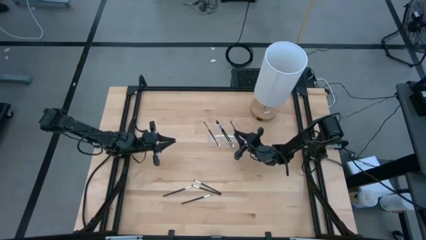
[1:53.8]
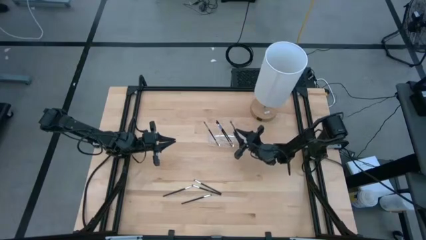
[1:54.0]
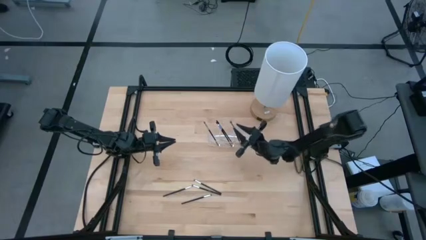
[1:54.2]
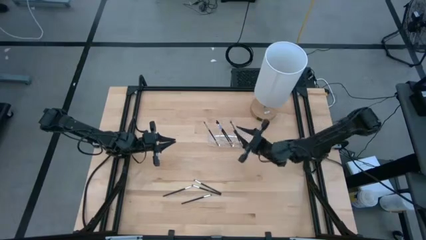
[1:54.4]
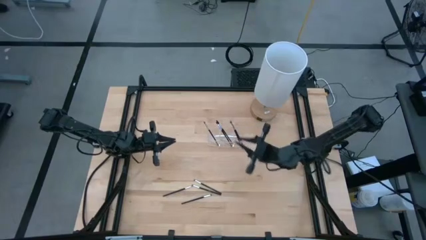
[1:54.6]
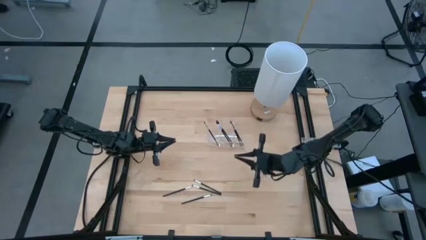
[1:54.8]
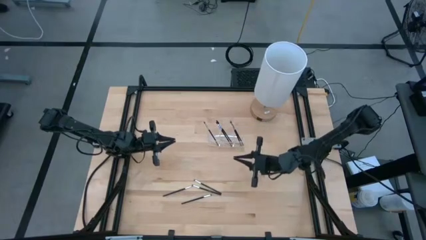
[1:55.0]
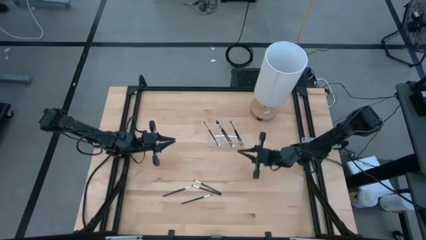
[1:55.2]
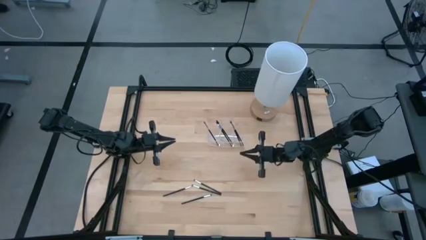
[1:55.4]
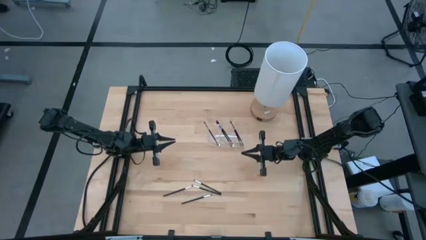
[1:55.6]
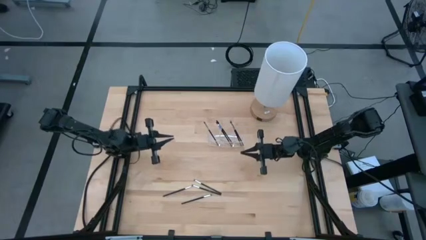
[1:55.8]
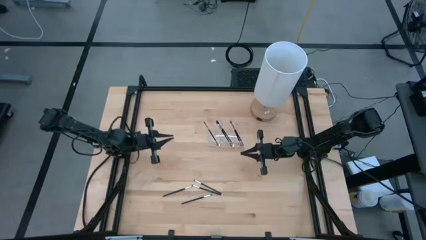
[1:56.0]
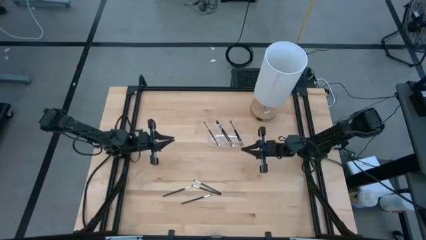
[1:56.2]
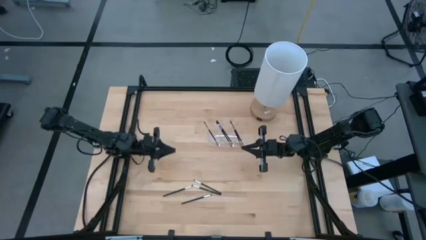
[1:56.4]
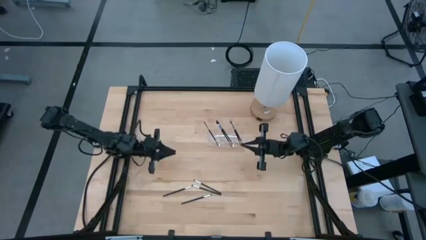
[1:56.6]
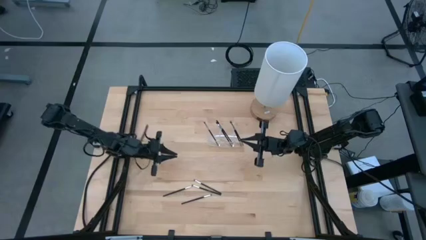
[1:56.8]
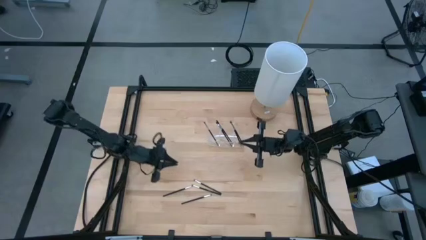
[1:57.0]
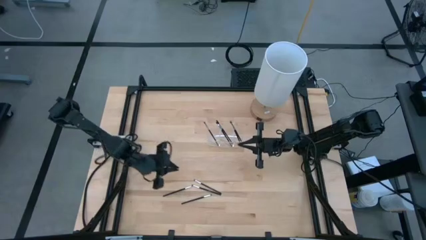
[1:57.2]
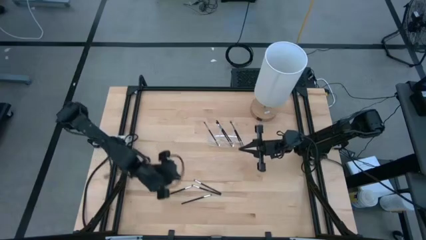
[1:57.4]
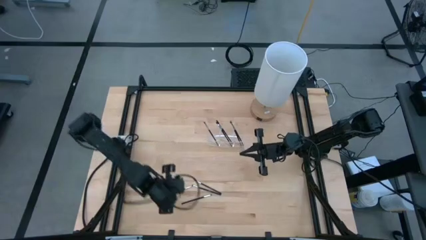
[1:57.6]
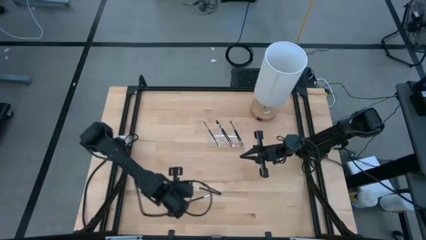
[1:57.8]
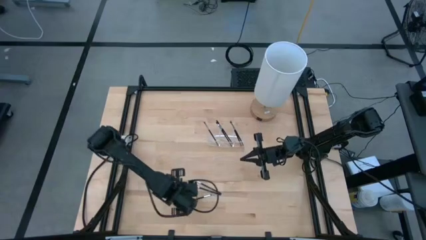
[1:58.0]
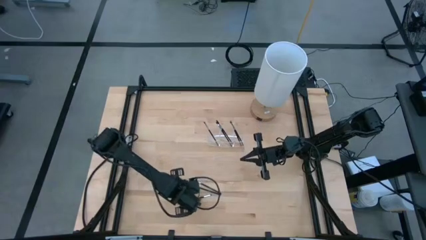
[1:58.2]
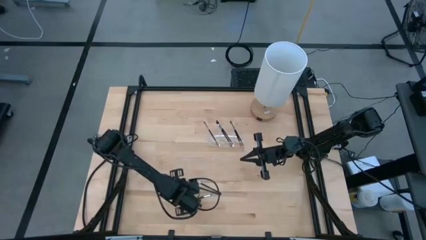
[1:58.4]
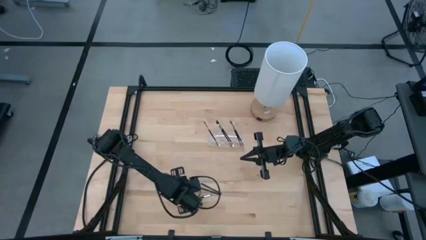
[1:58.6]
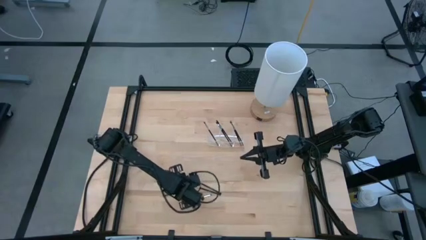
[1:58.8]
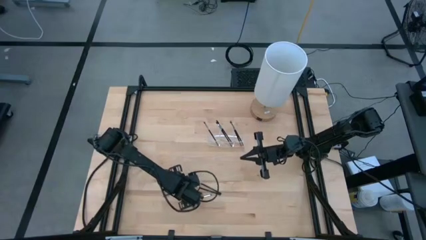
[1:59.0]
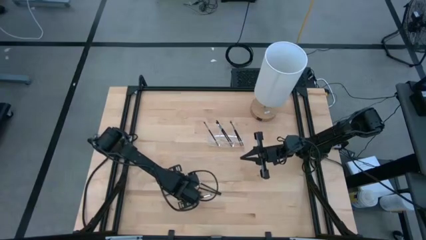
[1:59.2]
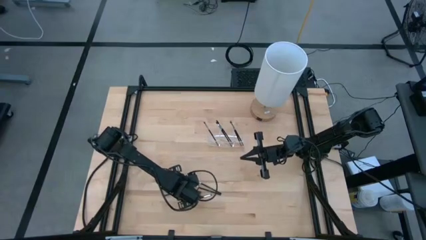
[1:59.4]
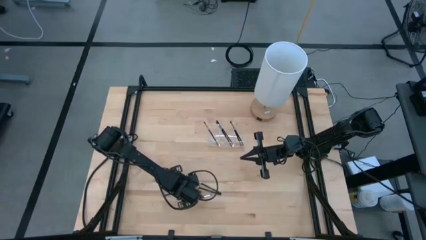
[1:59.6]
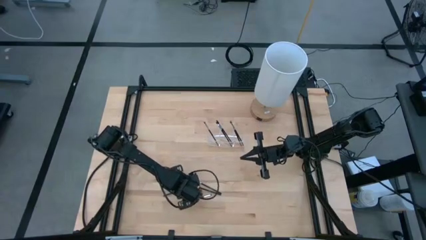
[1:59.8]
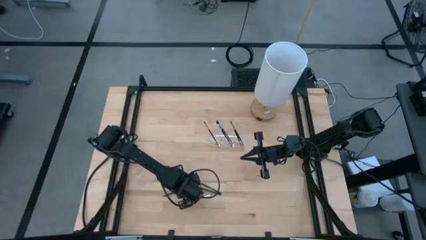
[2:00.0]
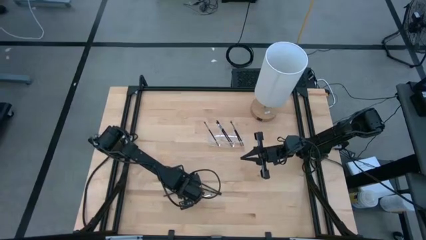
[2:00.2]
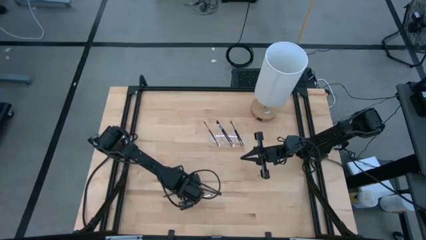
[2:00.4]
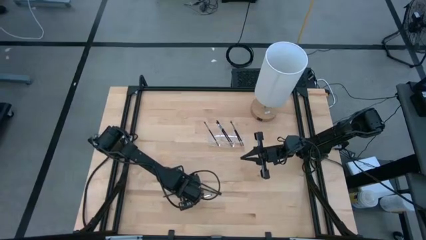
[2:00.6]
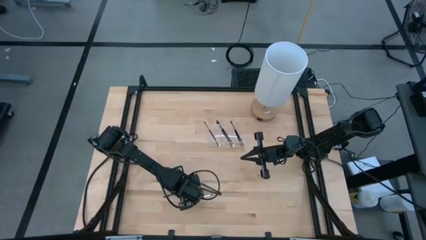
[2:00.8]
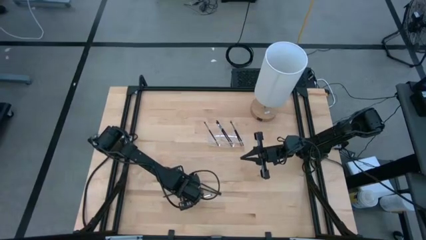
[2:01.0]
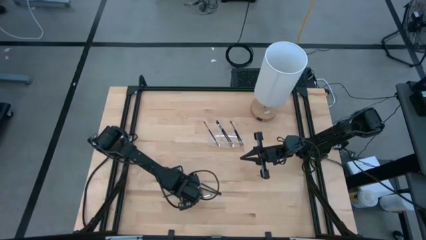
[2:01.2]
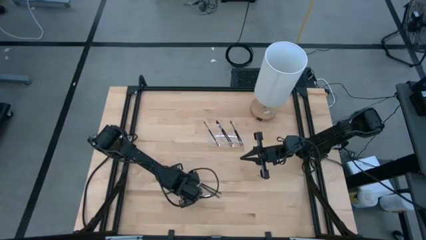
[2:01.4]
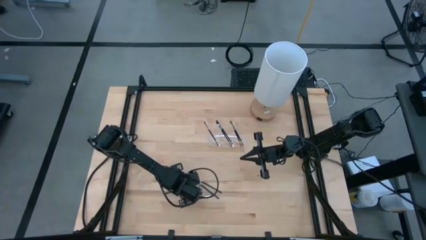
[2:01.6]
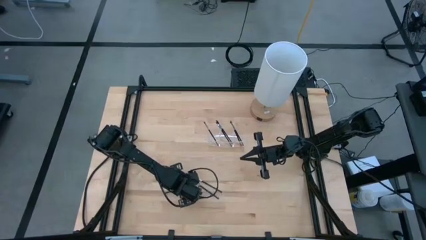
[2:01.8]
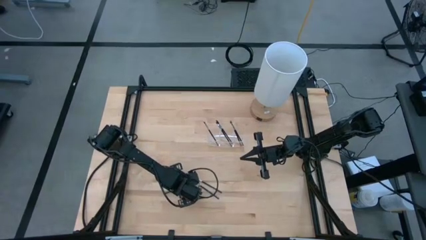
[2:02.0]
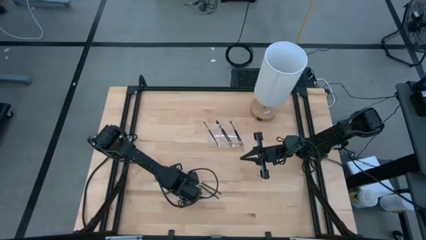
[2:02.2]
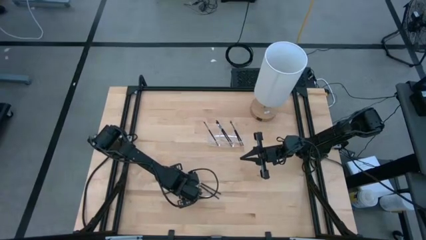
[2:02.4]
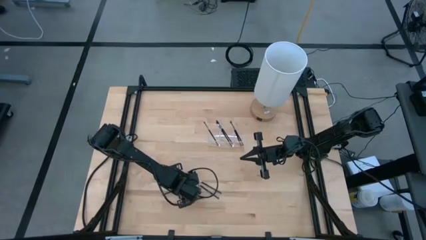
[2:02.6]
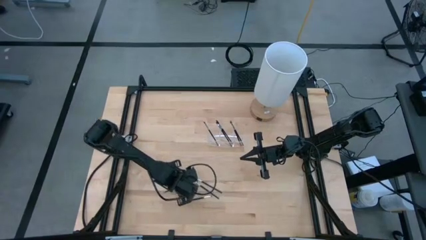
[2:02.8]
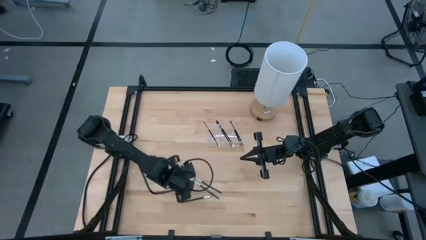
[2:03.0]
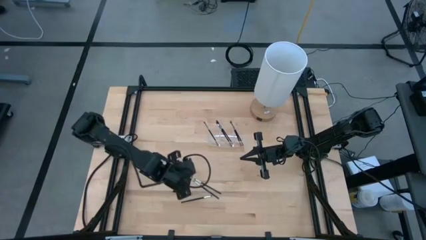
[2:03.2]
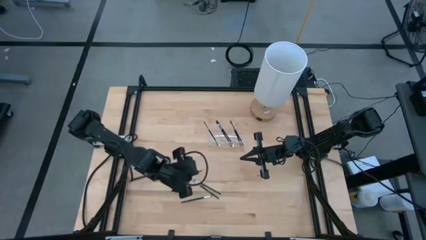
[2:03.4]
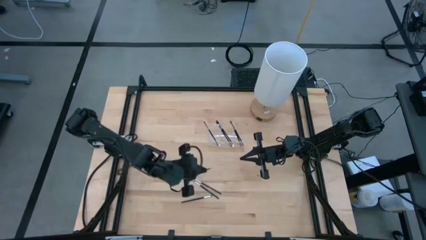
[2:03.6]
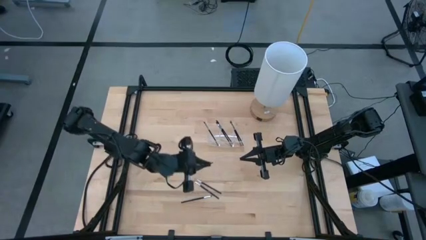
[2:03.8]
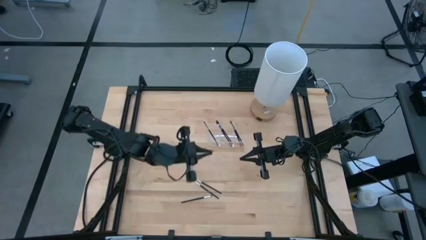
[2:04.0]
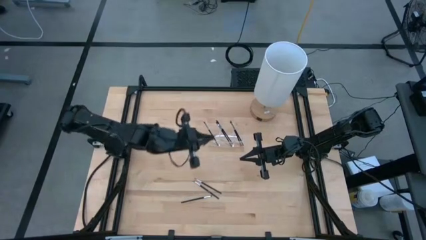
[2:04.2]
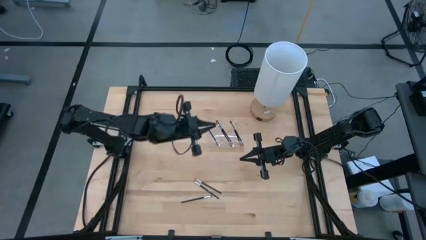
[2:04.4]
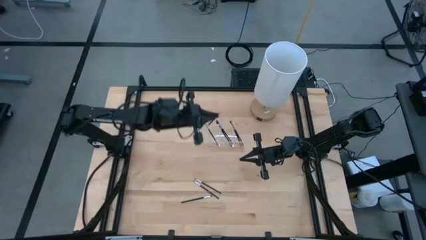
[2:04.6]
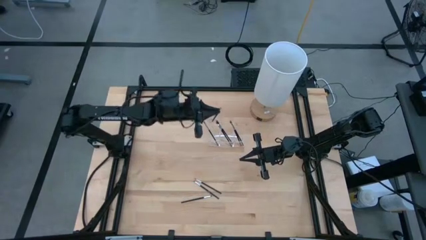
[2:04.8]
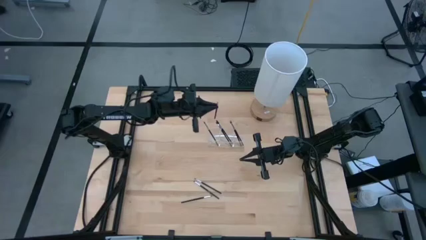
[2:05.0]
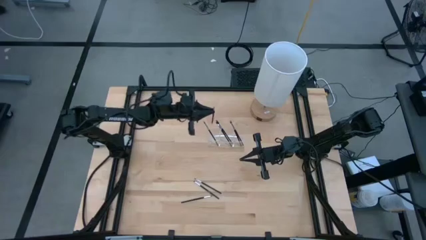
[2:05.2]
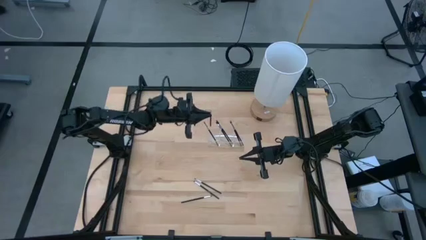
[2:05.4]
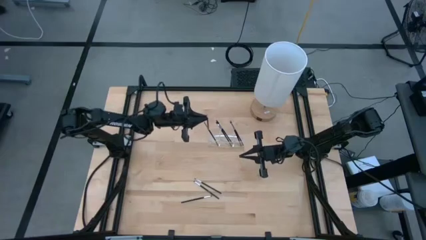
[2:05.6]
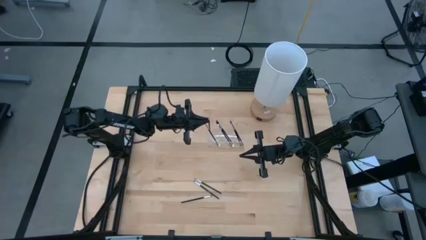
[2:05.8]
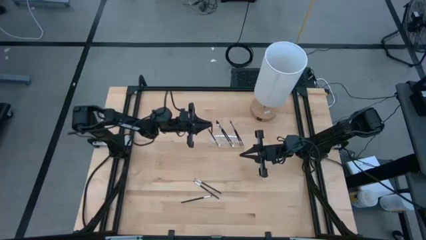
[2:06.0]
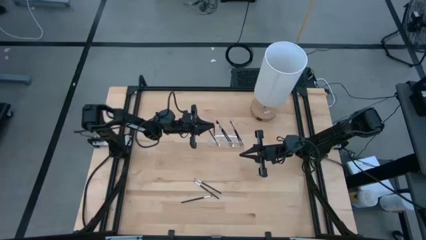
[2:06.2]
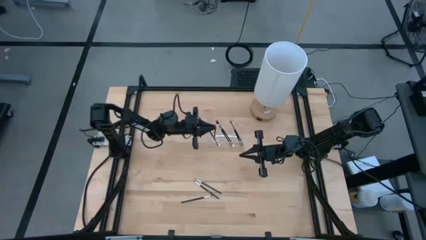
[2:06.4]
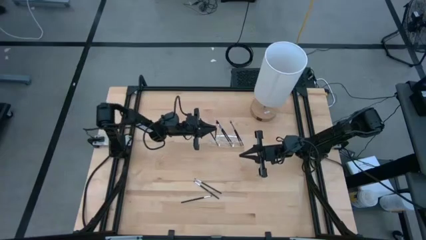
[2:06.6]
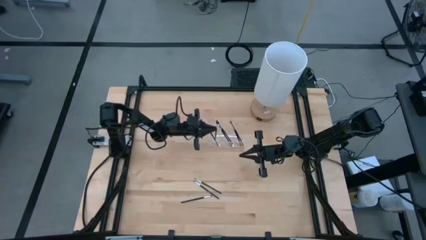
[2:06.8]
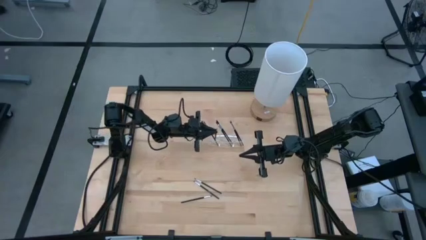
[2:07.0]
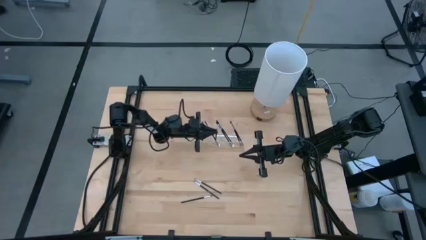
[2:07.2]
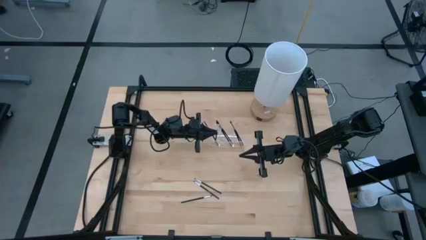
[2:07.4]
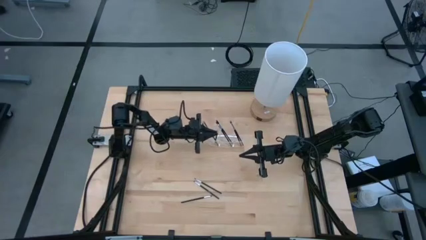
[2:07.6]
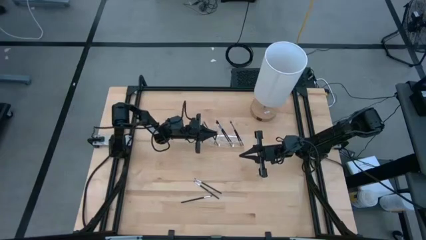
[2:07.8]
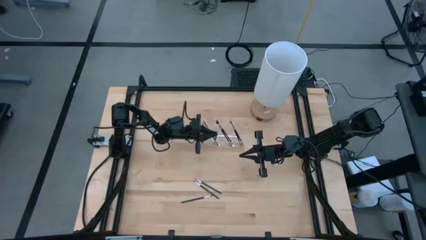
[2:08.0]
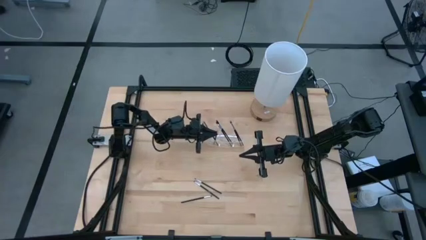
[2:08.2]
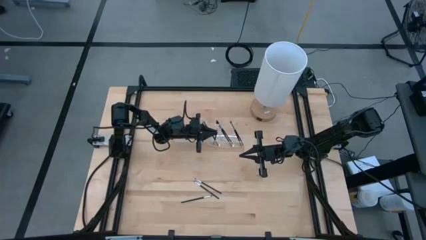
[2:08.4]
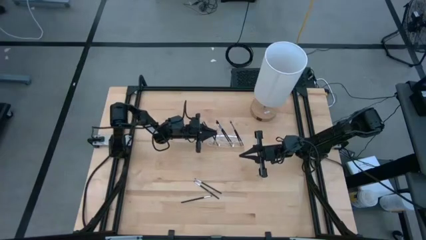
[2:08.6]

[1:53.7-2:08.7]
Task: Put items in baskets/containers
Put the black eyeshadow brush into the left section of the transparent organizer
